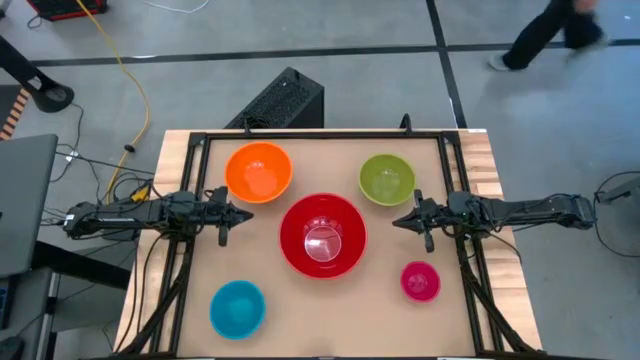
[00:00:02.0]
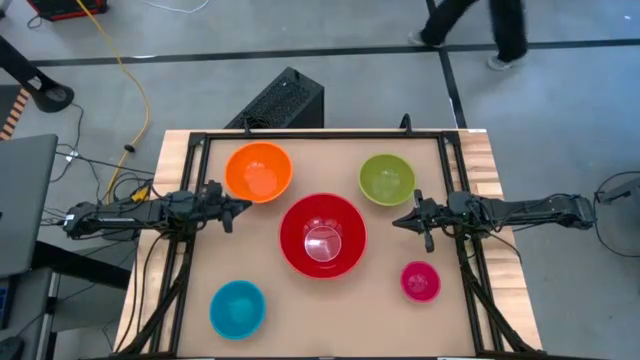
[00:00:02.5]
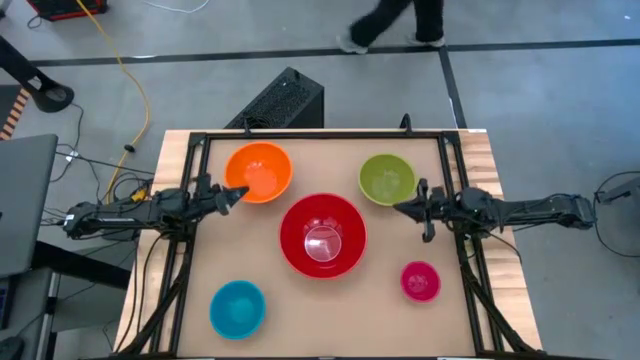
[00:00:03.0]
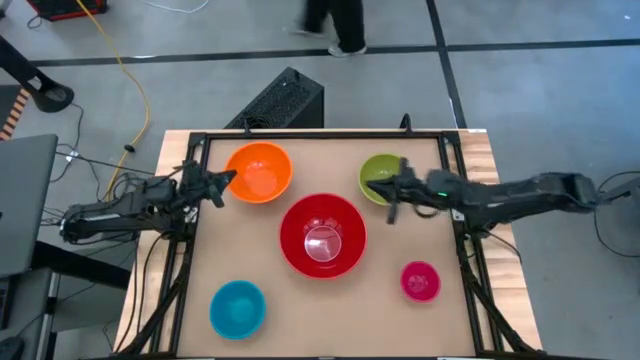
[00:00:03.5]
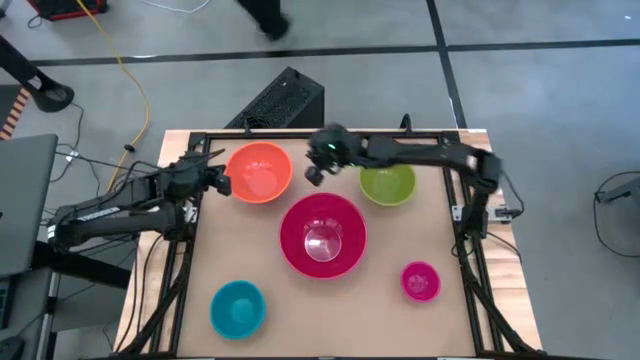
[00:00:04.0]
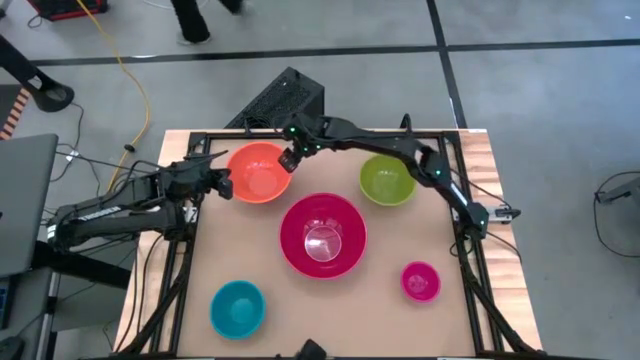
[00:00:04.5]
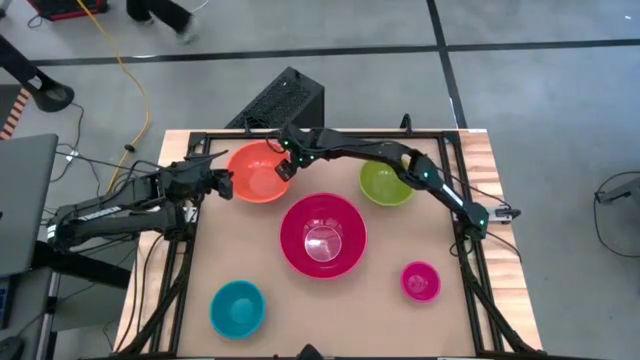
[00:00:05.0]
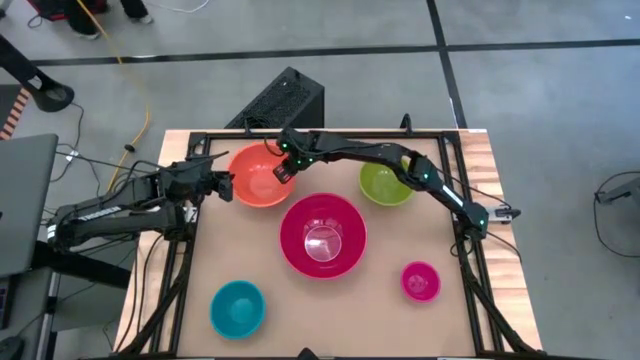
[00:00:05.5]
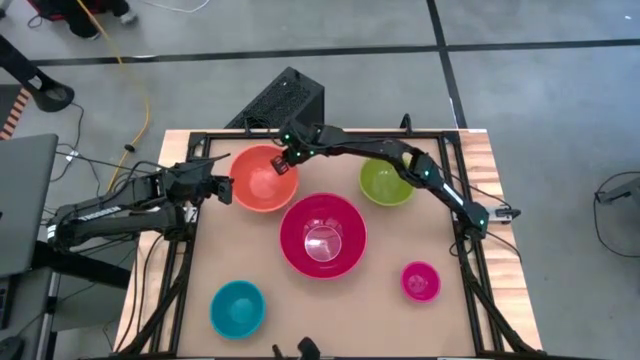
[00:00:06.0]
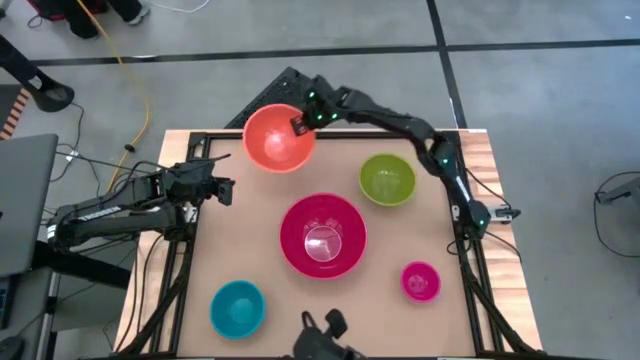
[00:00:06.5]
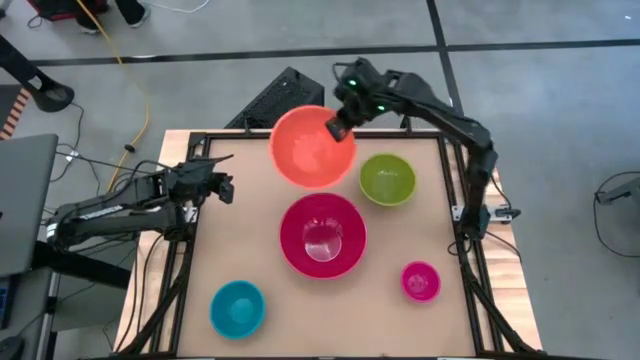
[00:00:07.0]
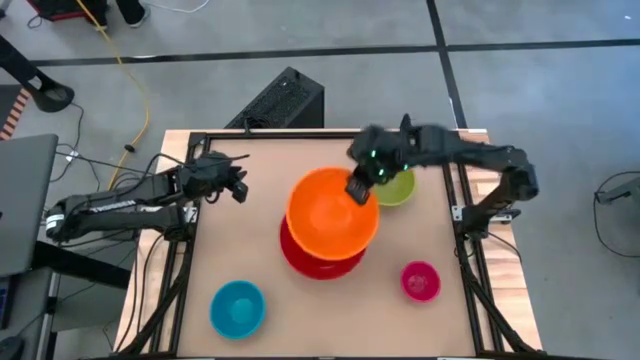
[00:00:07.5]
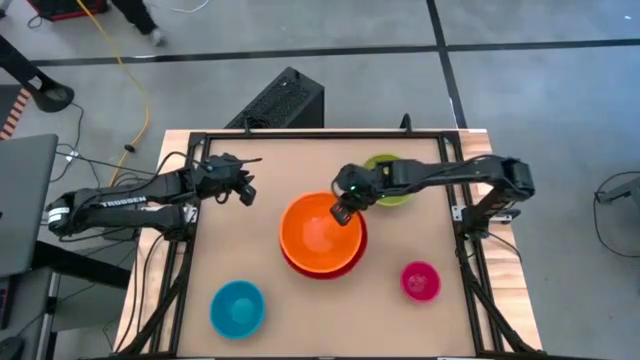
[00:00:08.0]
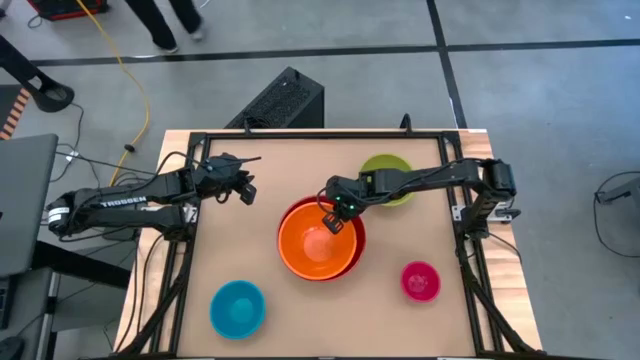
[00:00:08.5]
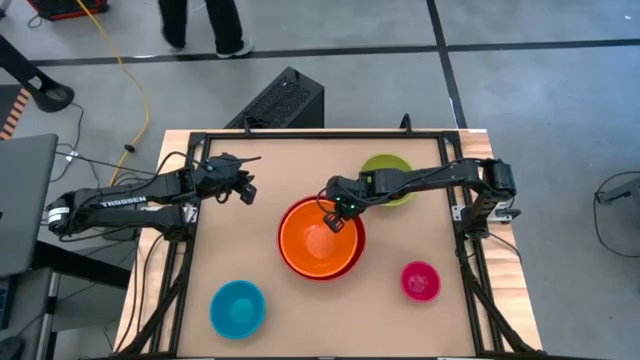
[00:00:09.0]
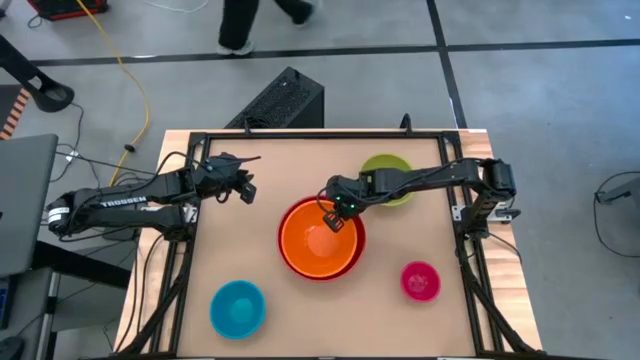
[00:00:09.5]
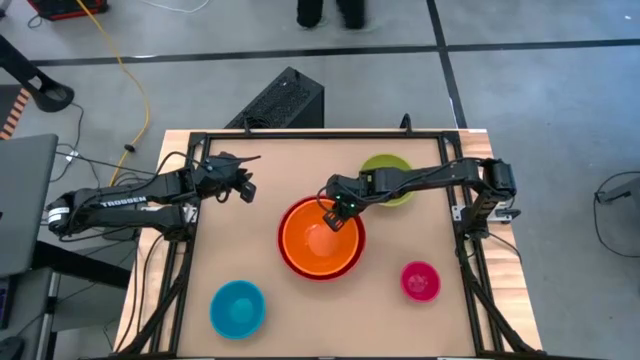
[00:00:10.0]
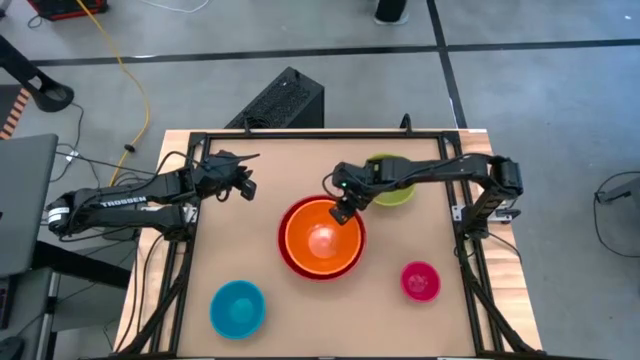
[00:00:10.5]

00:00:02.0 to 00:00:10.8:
Stack the orange bowl on top of the red bowl

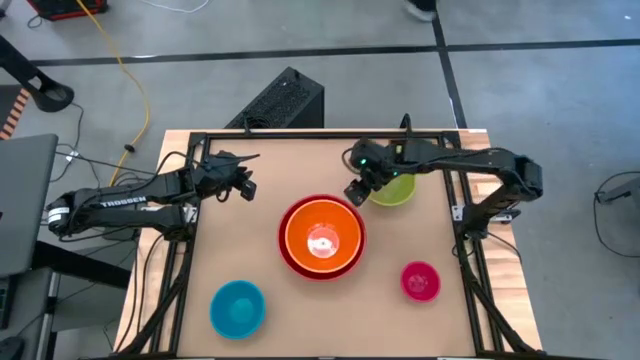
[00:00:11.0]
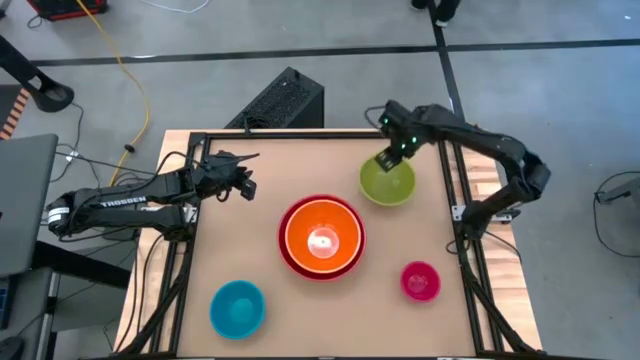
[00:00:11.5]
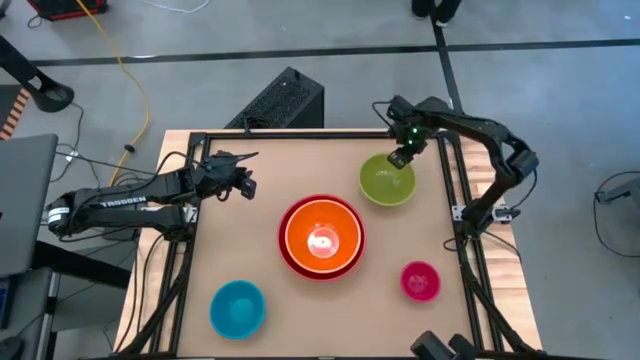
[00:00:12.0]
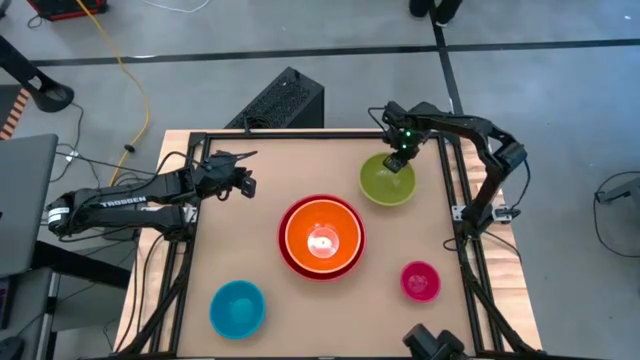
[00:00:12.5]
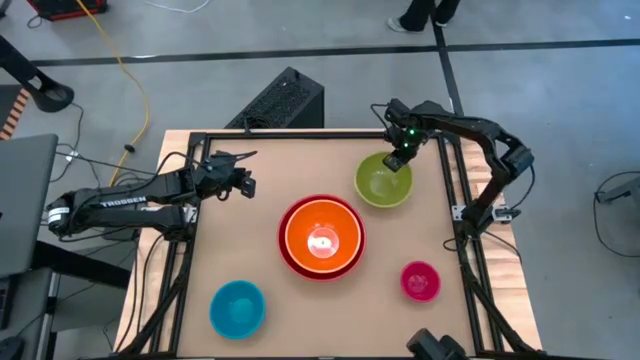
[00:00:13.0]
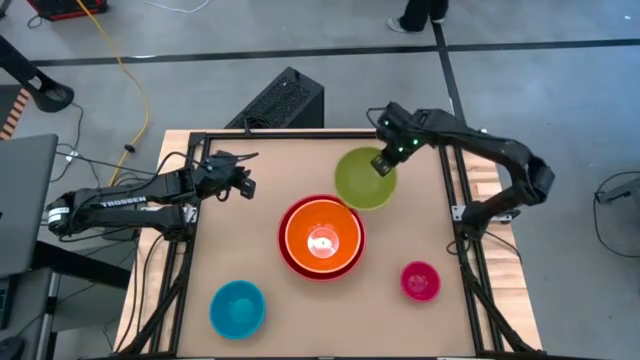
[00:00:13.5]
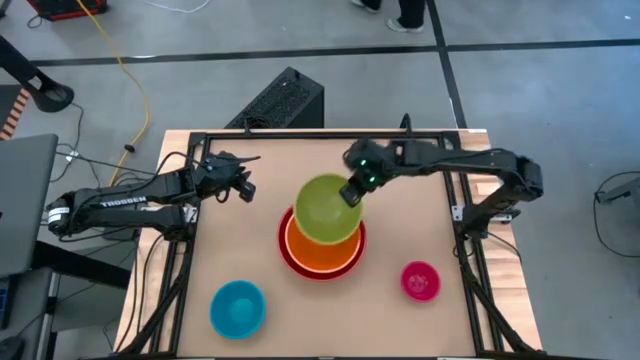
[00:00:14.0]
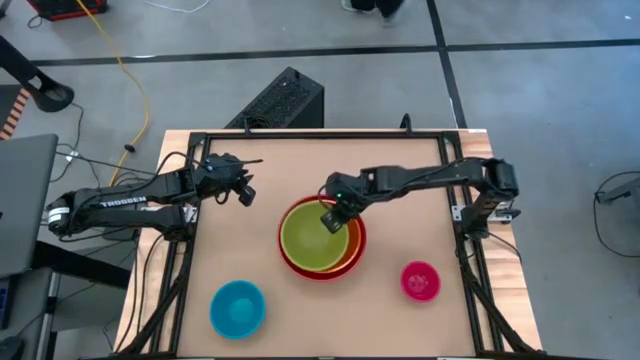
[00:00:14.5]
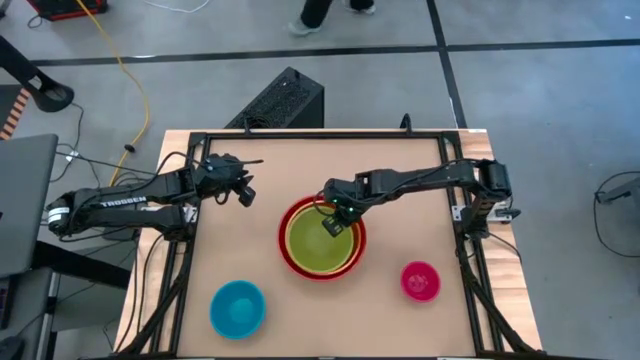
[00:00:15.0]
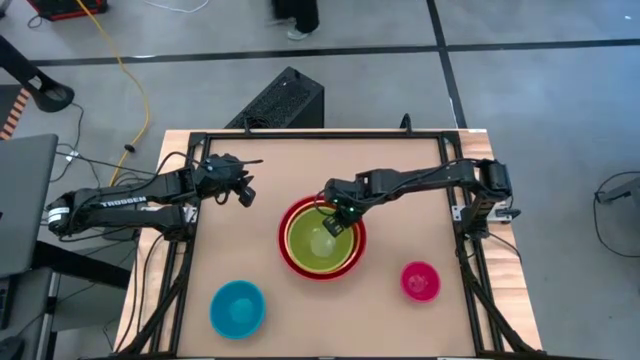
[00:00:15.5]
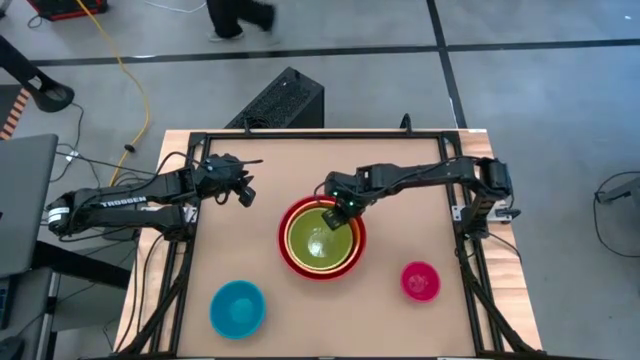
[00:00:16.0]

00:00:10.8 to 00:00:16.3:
Stack the green bowl on top of the orange bowl

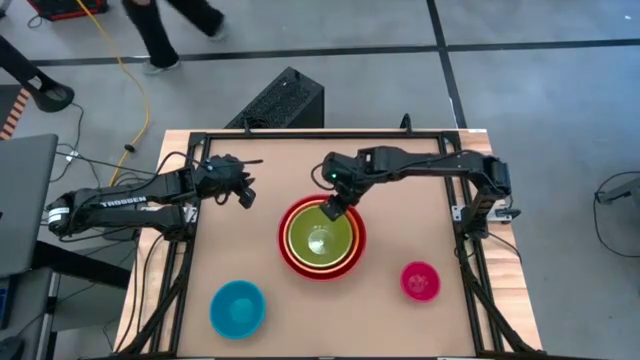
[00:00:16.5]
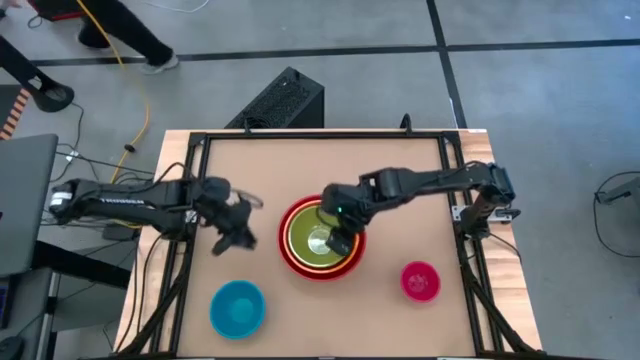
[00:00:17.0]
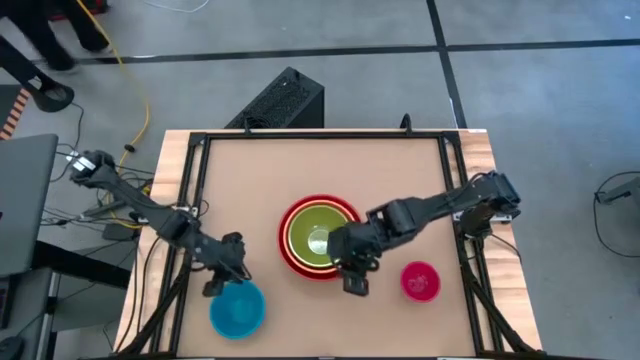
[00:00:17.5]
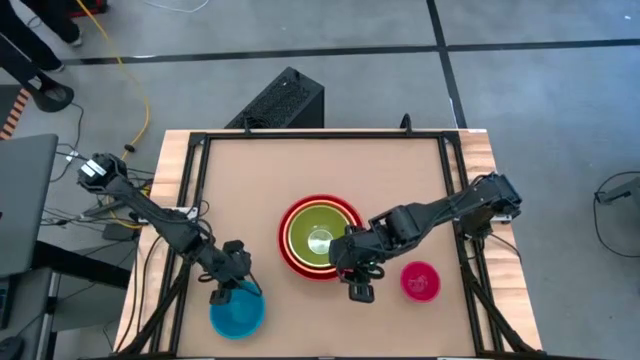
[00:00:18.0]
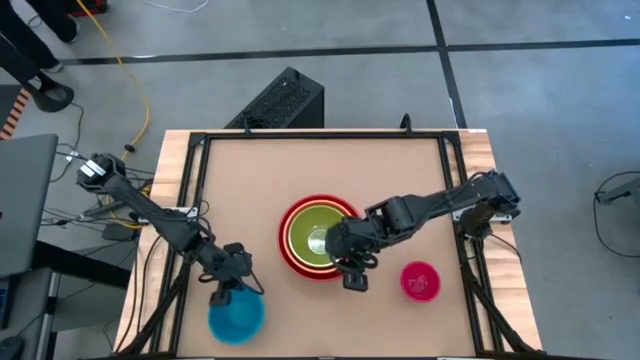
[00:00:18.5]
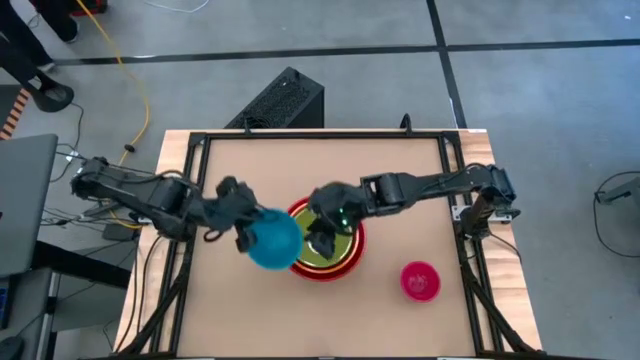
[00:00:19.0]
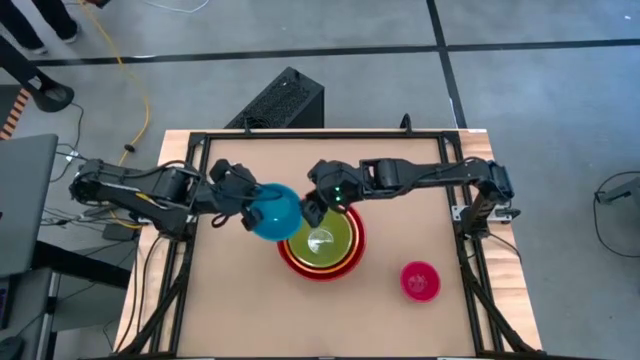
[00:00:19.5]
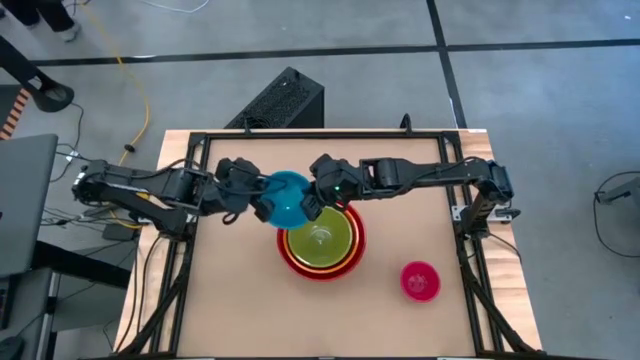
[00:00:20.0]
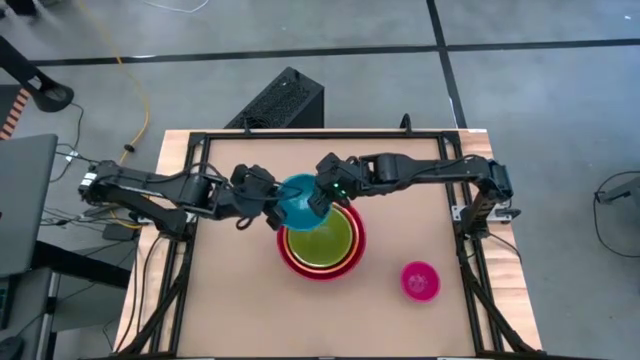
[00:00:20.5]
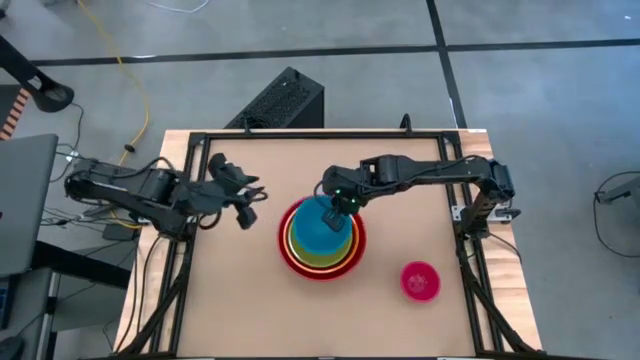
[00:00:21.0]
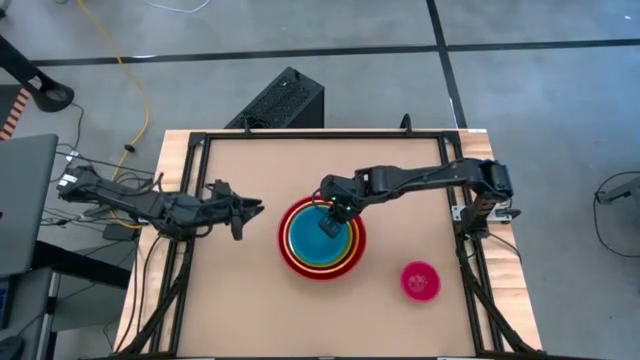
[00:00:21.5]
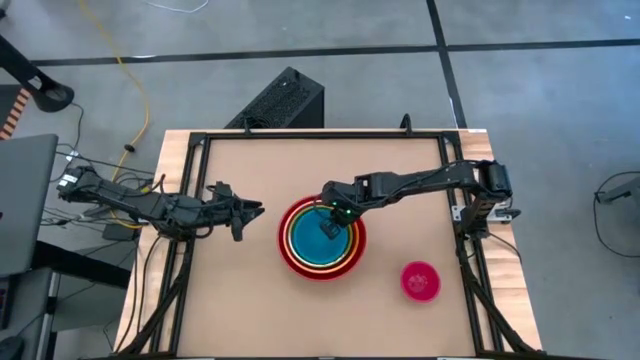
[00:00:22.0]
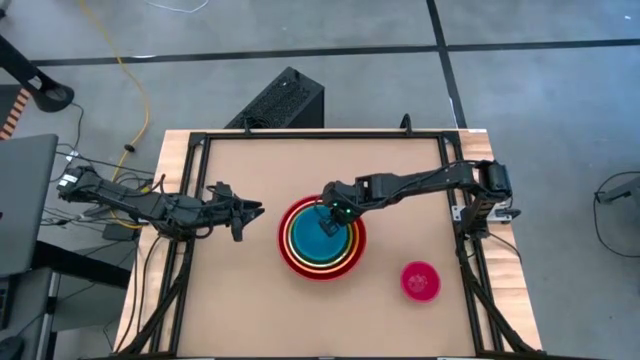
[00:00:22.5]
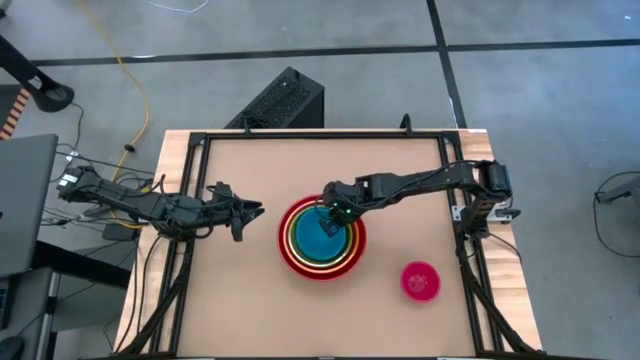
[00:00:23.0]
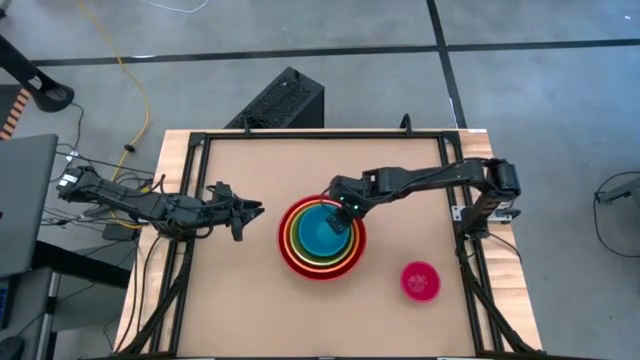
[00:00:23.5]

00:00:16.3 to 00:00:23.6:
Stack the blue bowl on top of the green bowl
